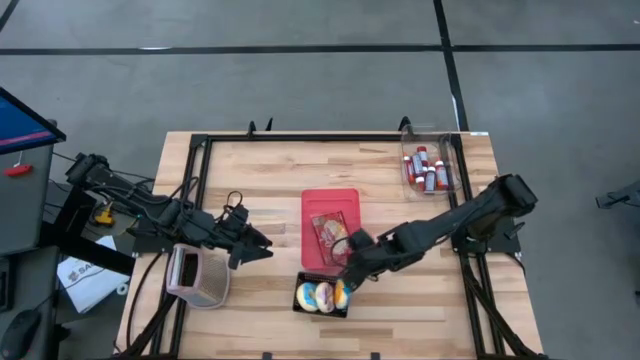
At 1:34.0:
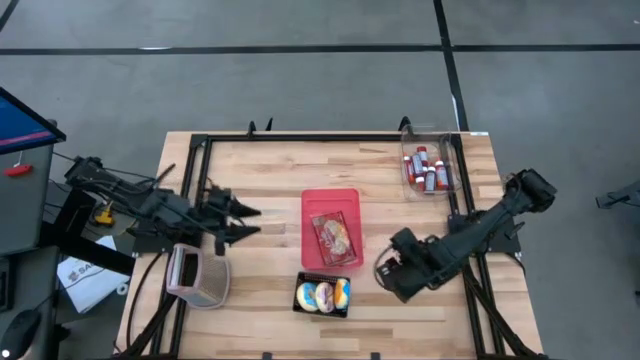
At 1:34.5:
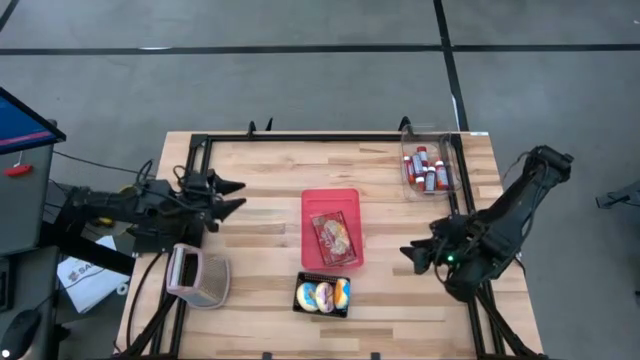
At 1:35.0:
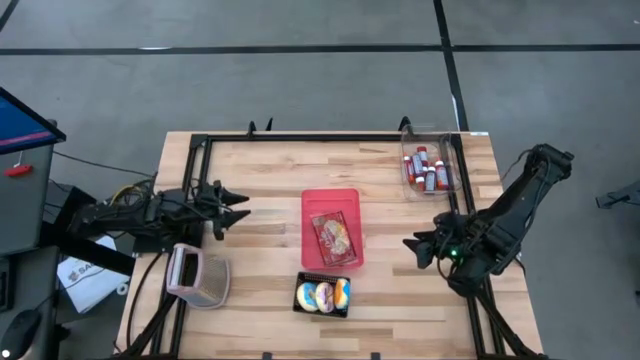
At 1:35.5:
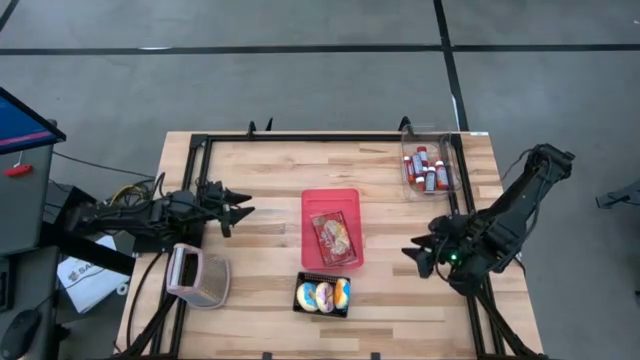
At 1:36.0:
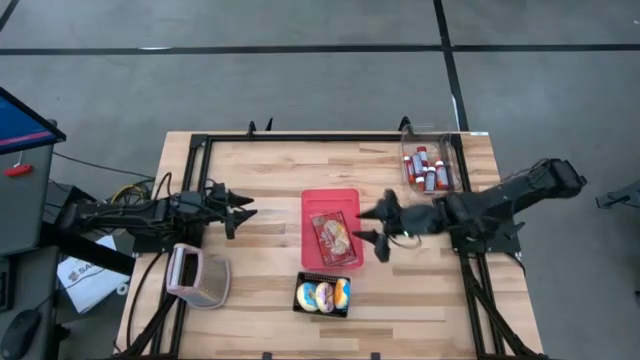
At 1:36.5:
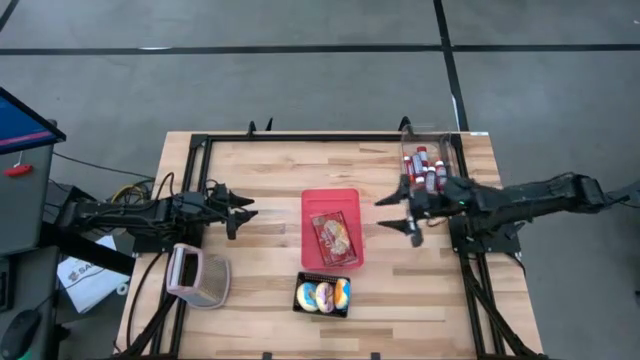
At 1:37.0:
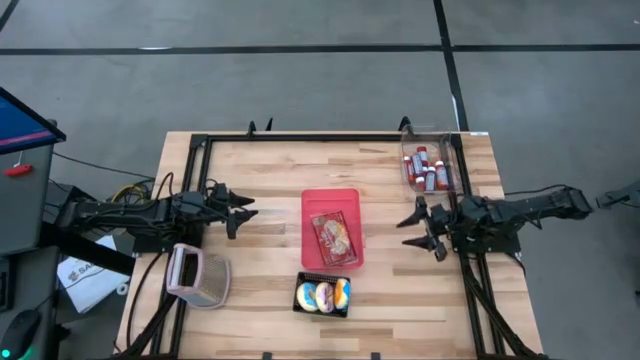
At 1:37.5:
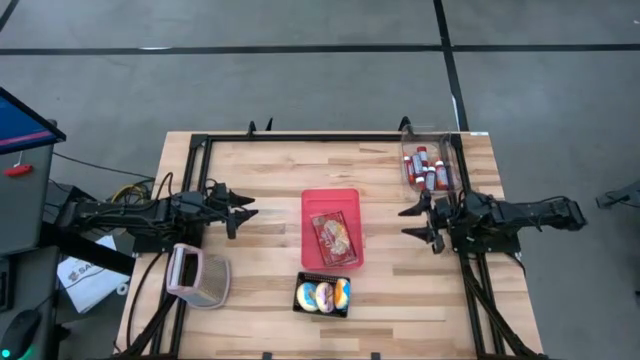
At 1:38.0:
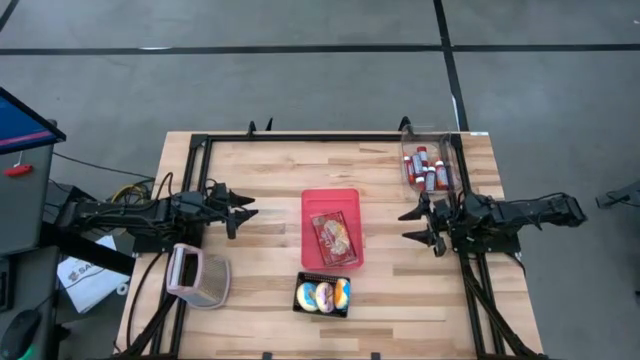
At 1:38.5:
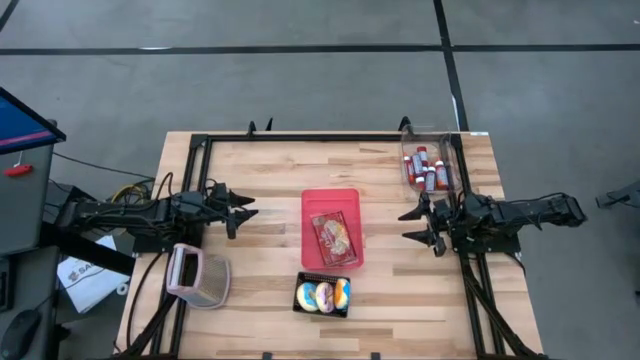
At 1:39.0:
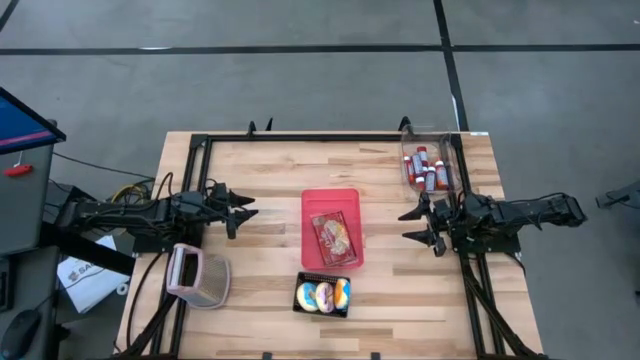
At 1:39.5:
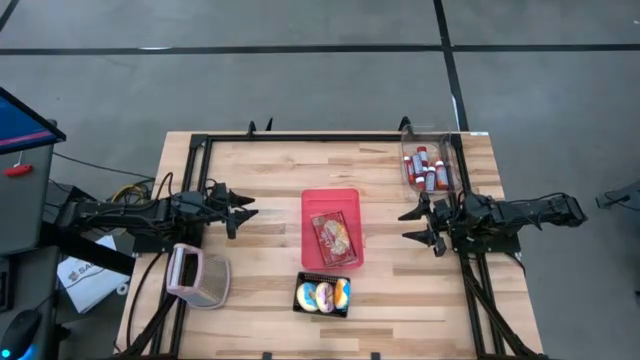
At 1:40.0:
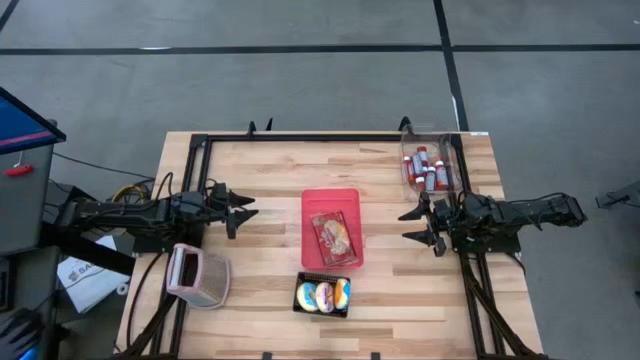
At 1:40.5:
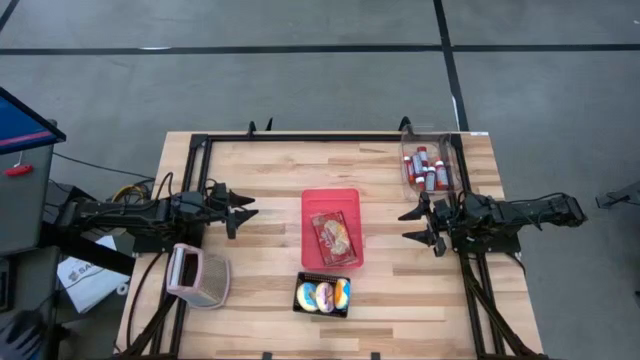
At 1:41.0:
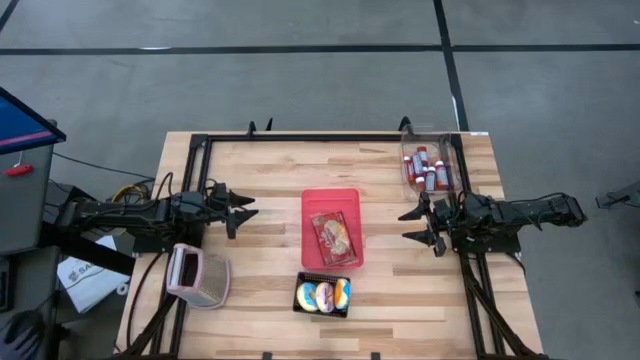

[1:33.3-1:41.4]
Return to Home Position

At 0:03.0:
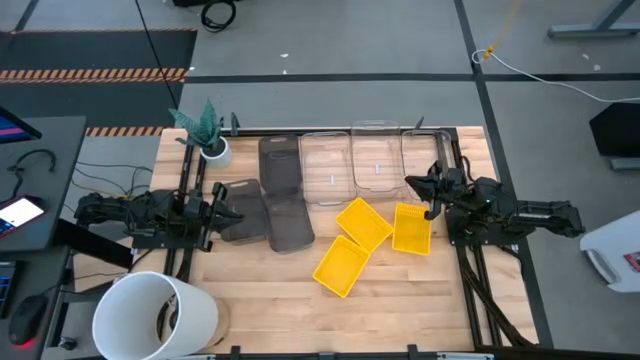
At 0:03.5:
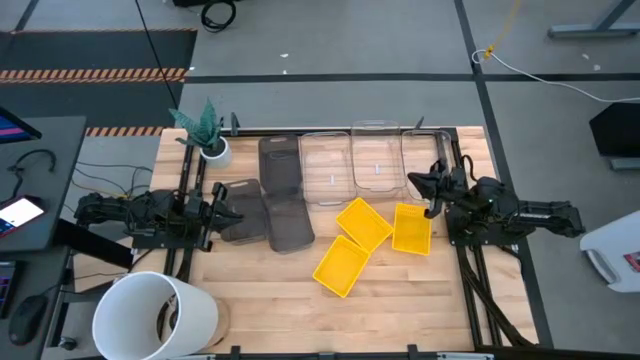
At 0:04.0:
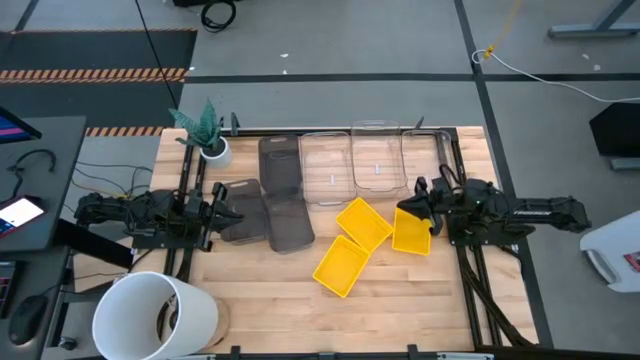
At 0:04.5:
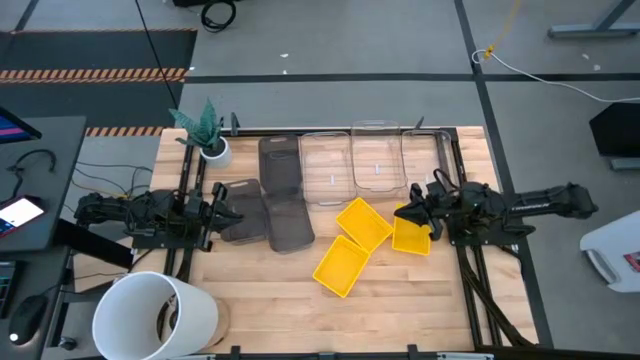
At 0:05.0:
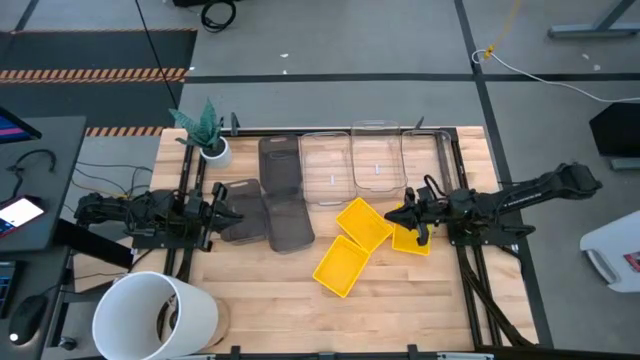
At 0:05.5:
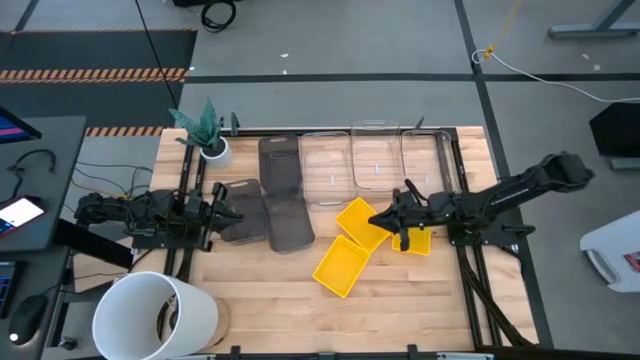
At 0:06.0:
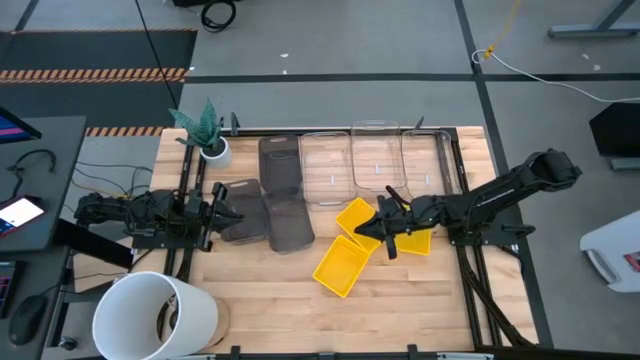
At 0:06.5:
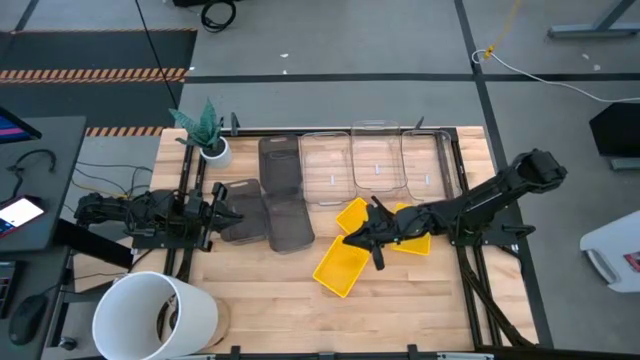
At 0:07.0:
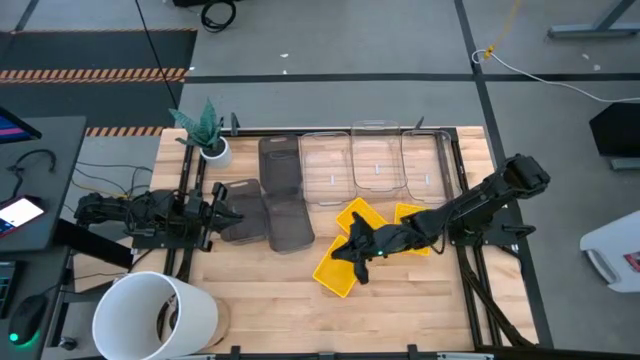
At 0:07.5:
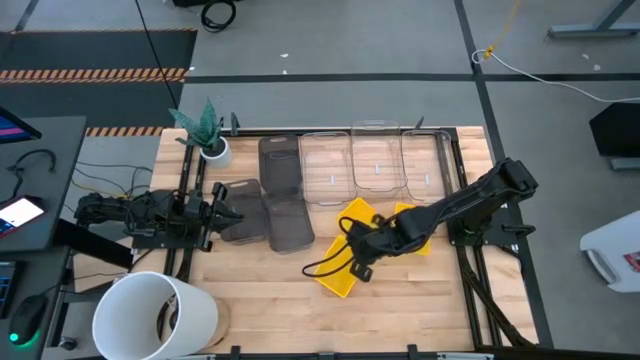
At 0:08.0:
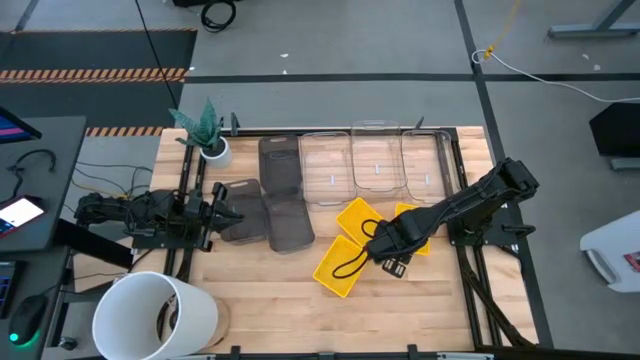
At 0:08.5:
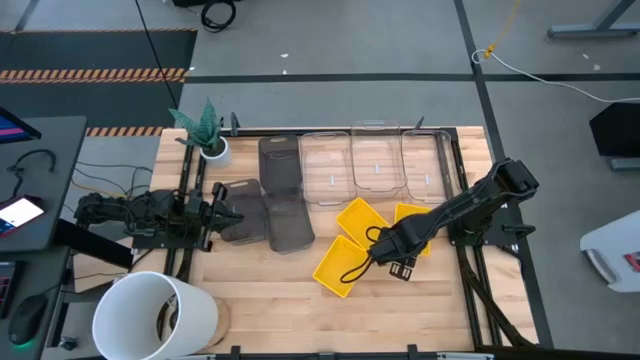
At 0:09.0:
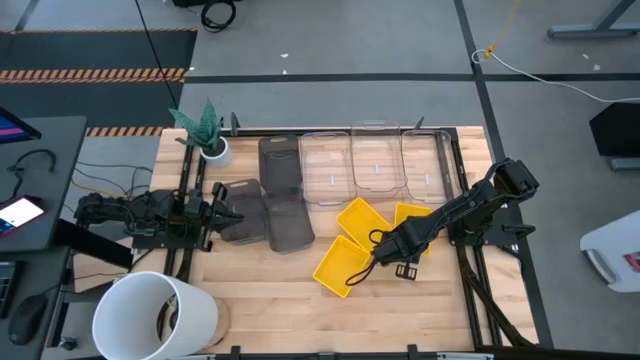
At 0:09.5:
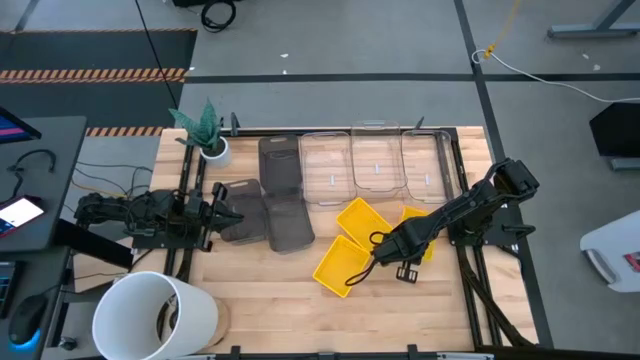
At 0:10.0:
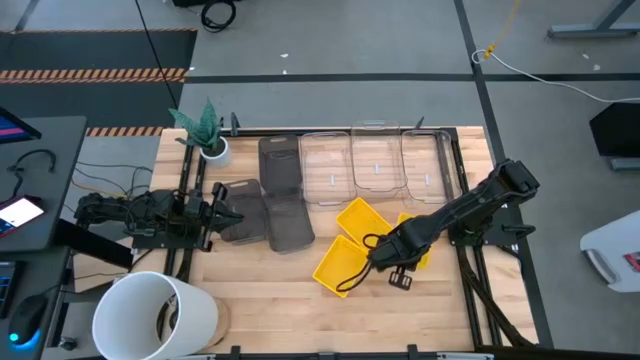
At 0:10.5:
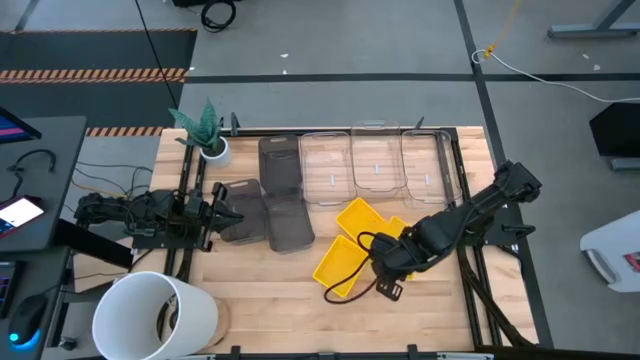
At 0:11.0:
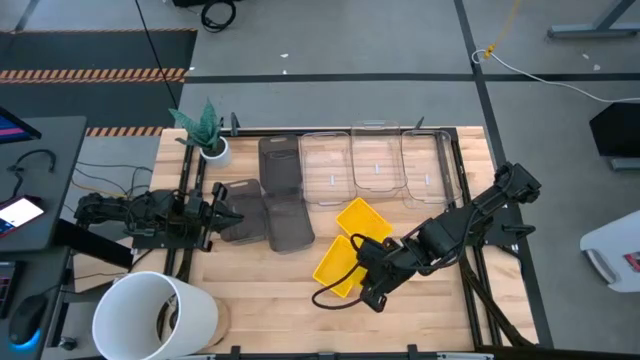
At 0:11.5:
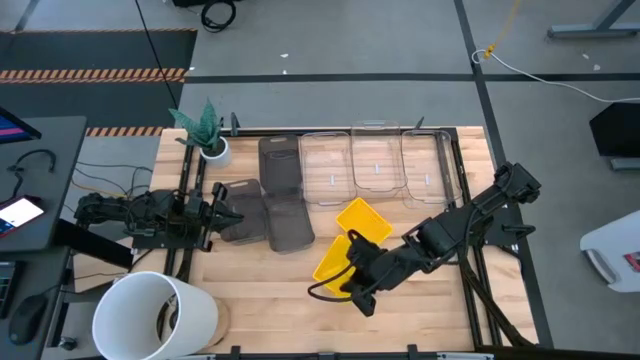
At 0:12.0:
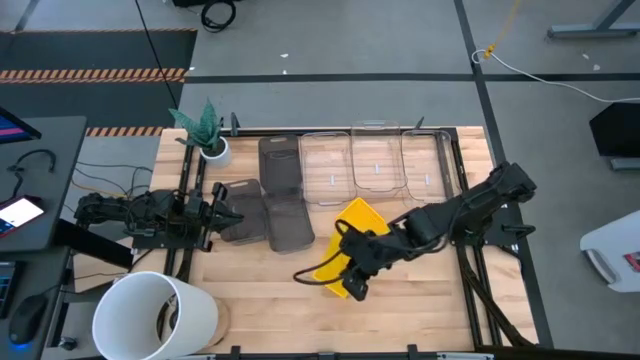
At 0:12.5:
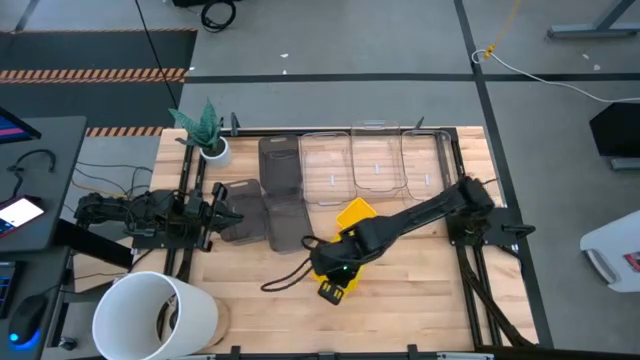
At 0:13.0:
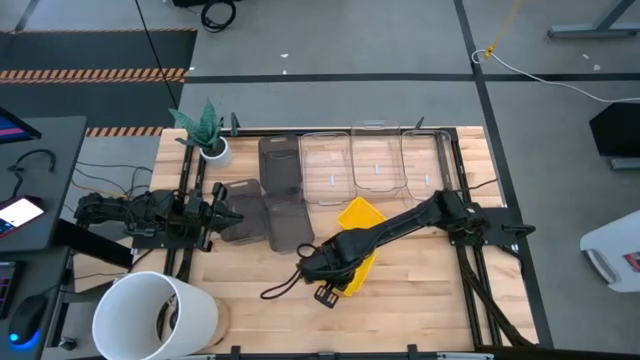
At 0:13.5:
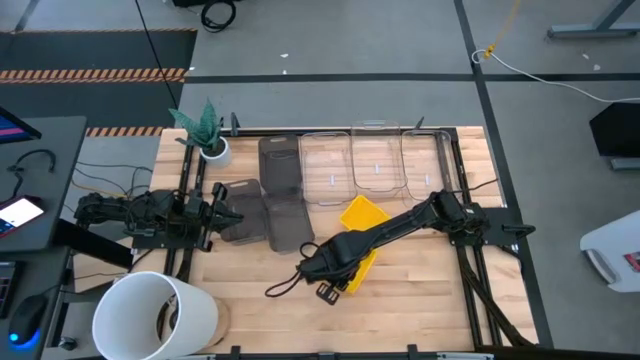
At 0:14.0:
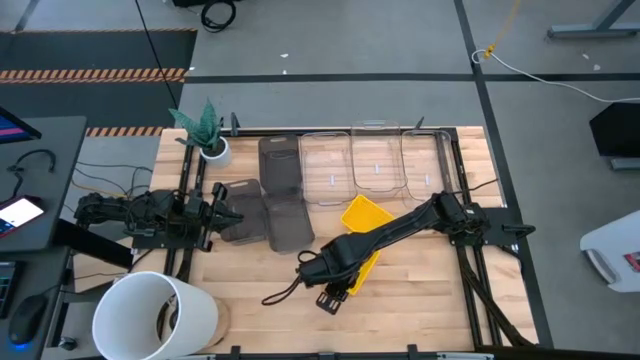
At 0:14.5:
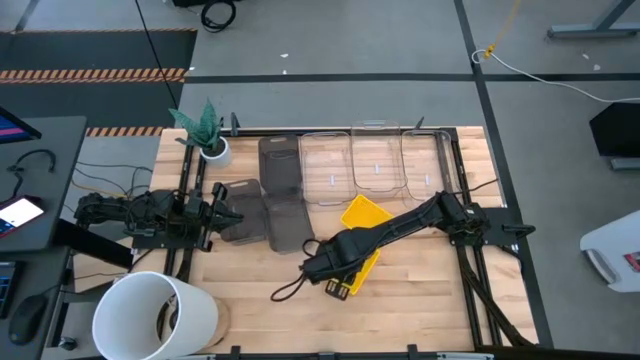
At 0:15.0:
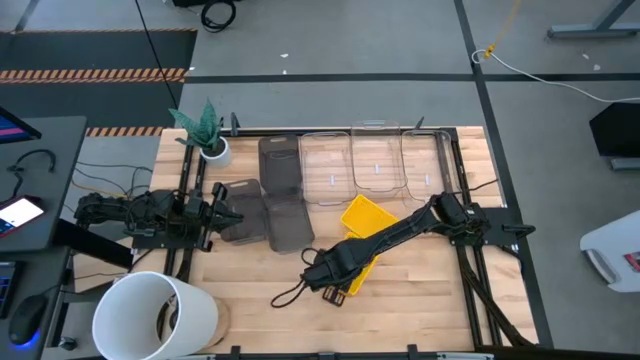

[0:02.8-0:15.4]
Stack the right yellow bin on the left yellow bin
